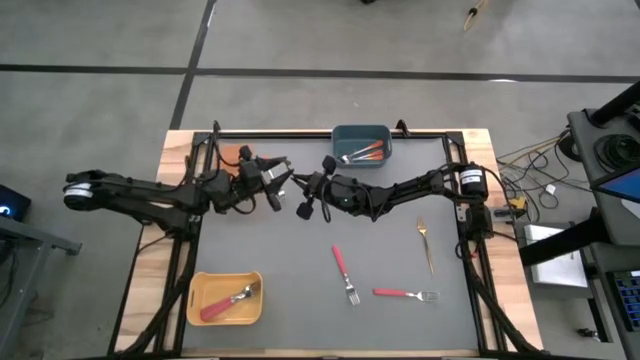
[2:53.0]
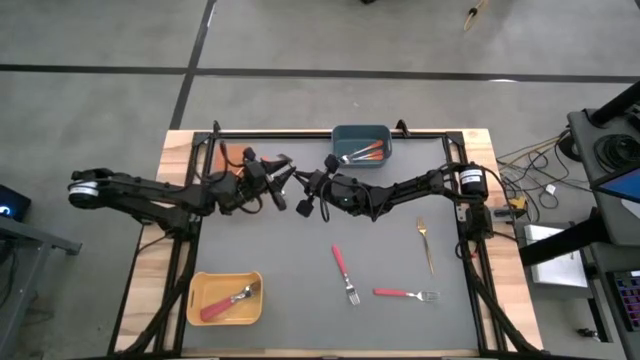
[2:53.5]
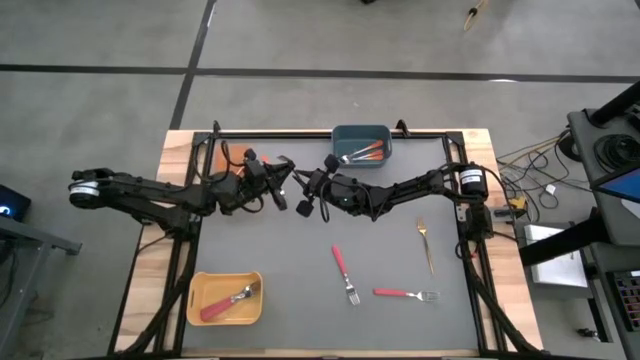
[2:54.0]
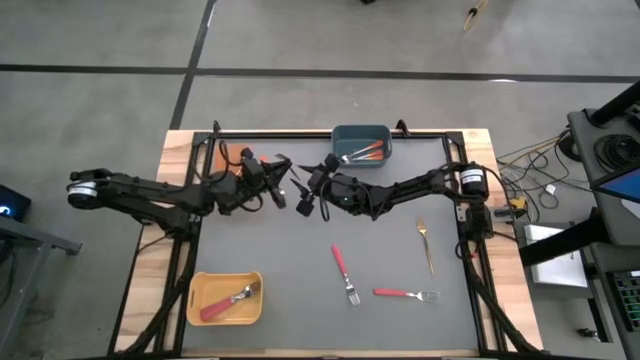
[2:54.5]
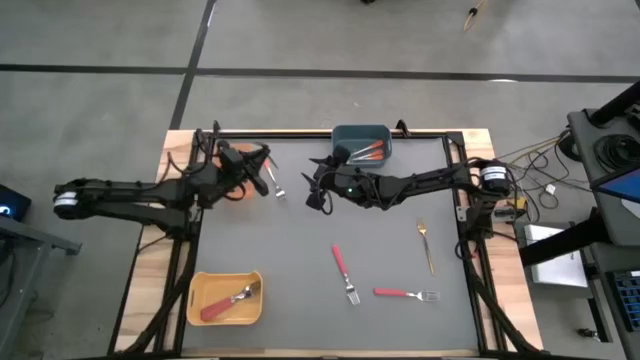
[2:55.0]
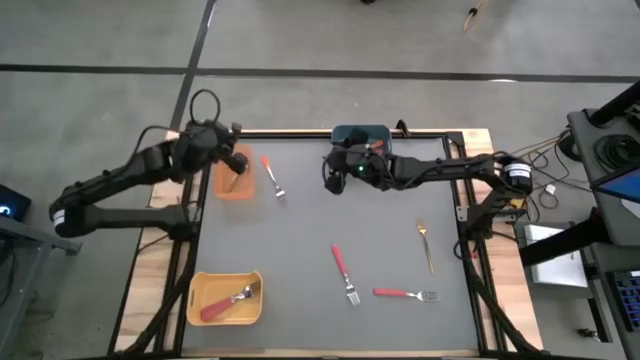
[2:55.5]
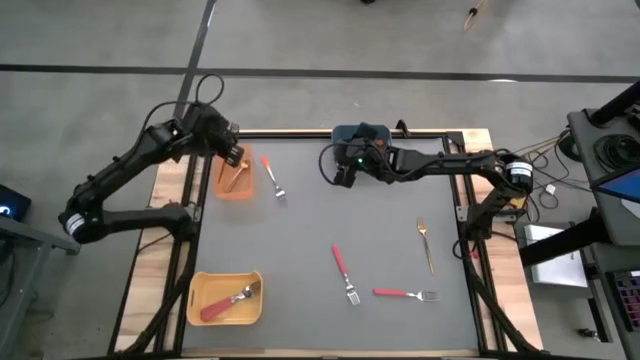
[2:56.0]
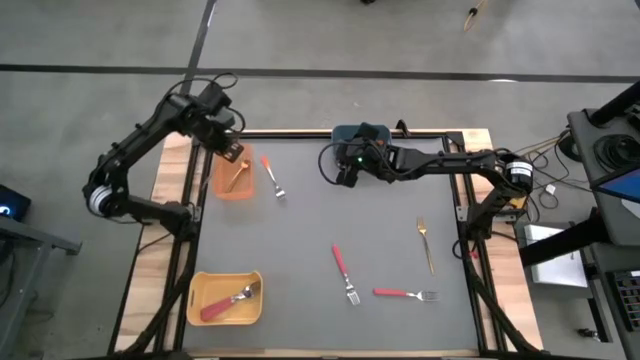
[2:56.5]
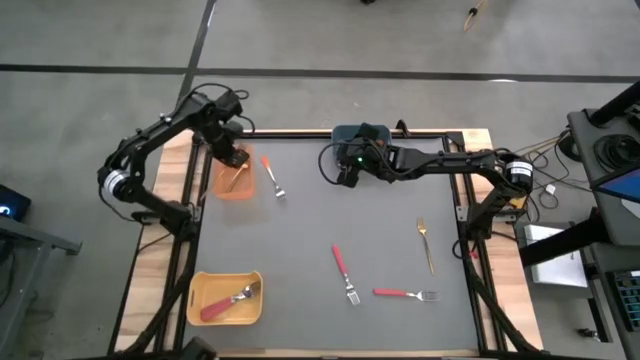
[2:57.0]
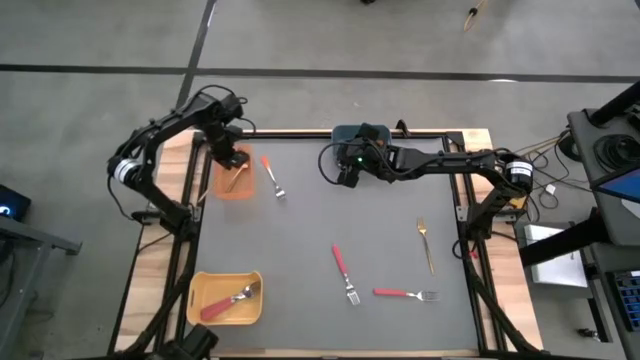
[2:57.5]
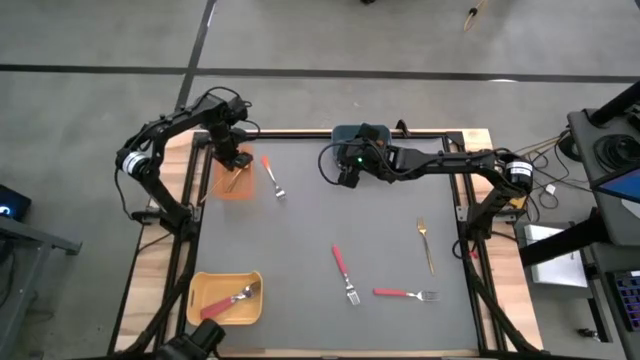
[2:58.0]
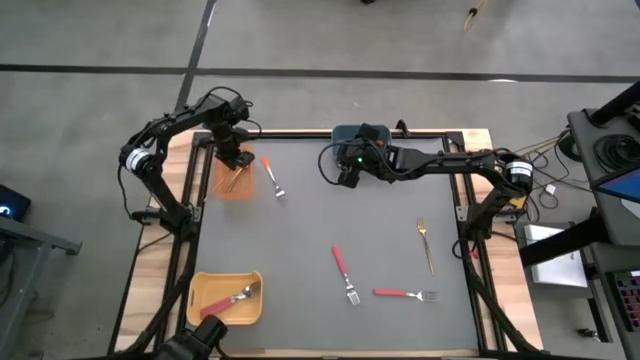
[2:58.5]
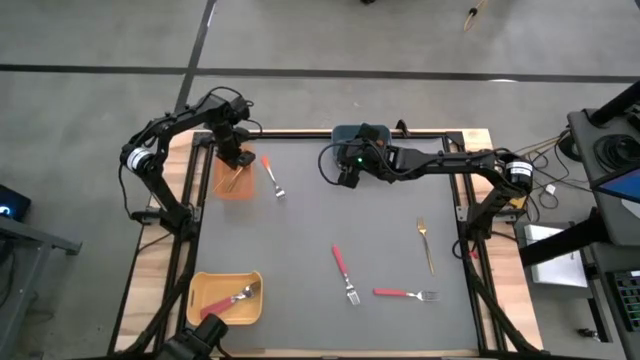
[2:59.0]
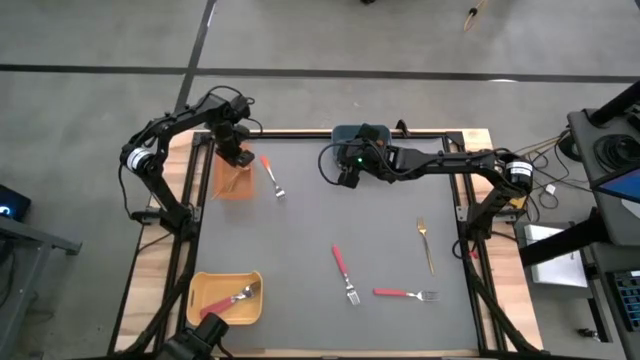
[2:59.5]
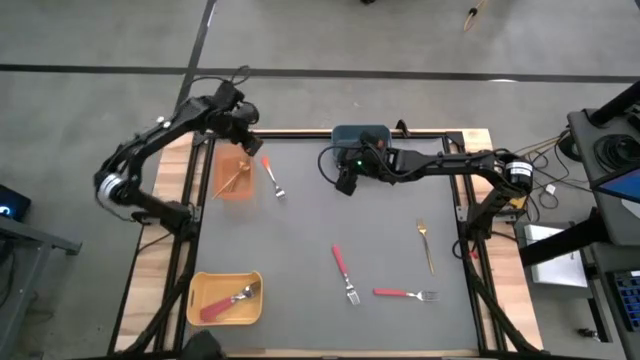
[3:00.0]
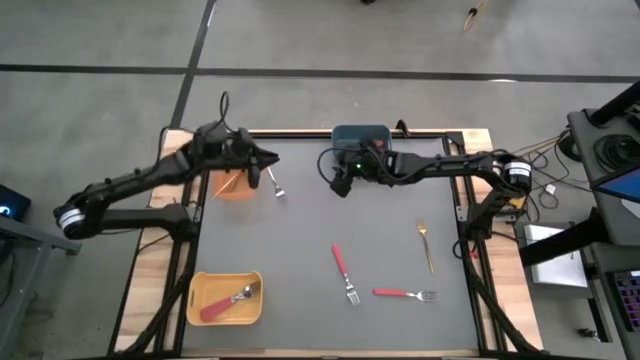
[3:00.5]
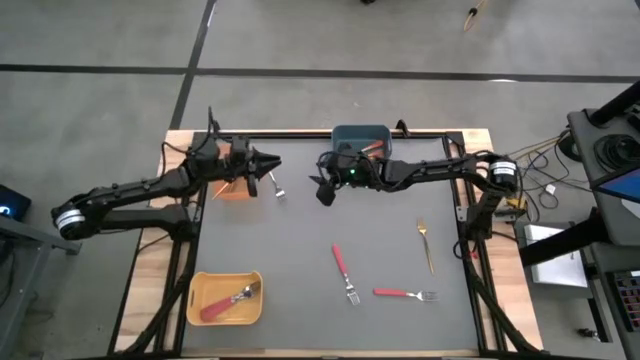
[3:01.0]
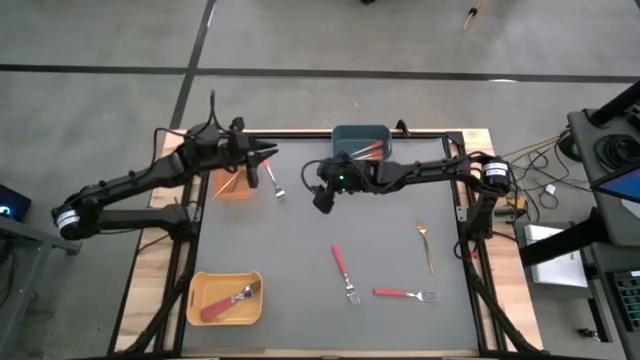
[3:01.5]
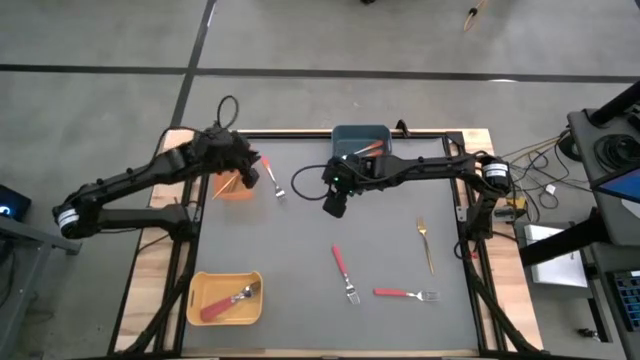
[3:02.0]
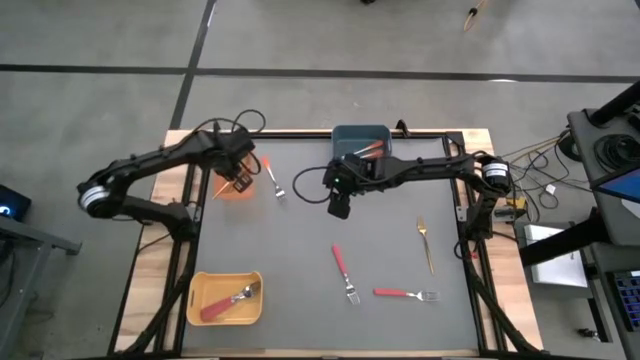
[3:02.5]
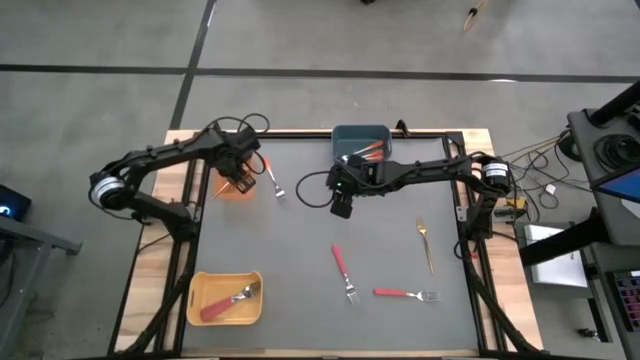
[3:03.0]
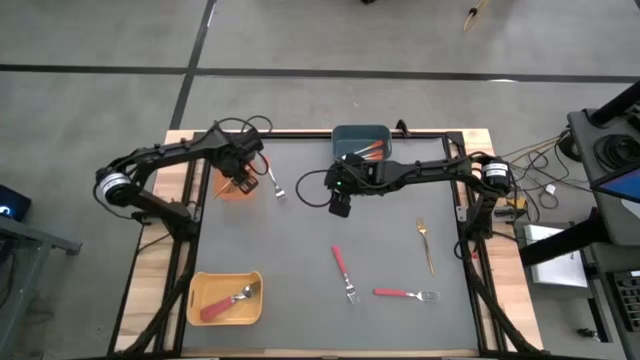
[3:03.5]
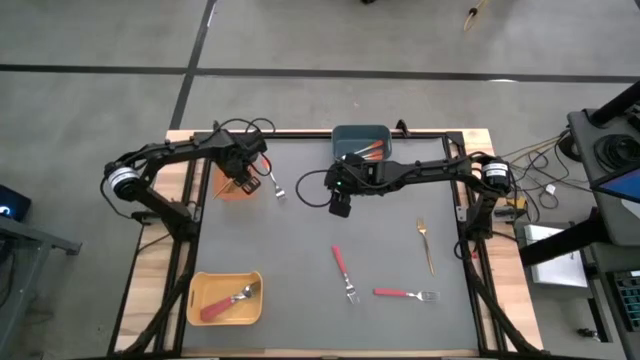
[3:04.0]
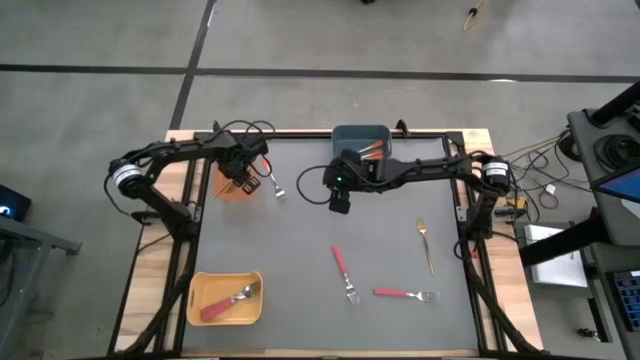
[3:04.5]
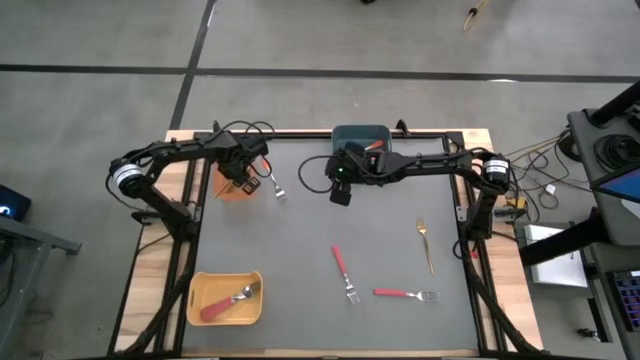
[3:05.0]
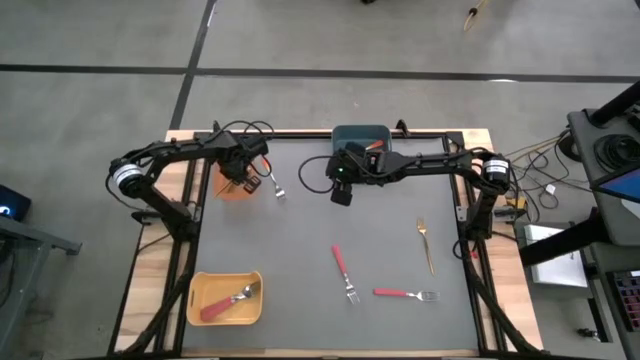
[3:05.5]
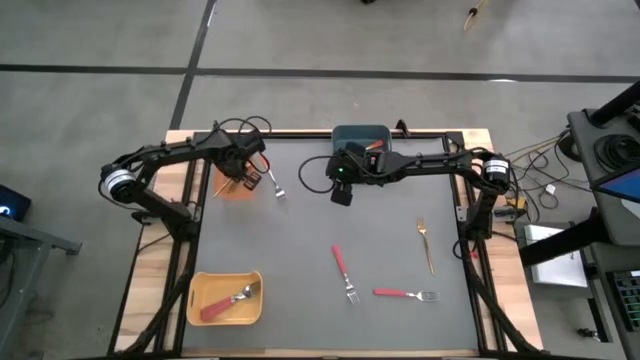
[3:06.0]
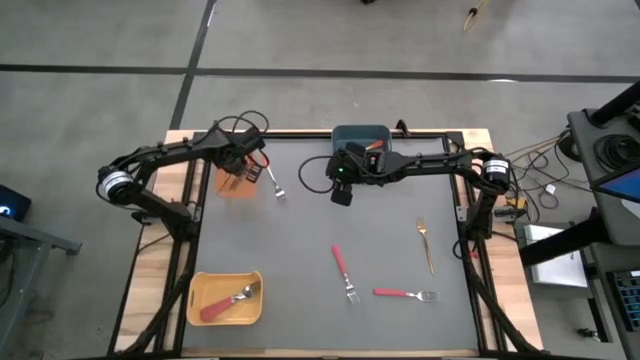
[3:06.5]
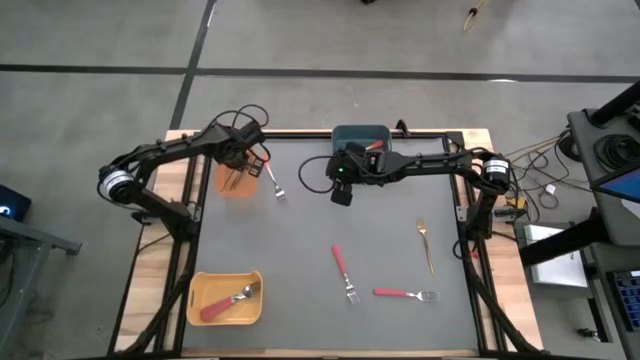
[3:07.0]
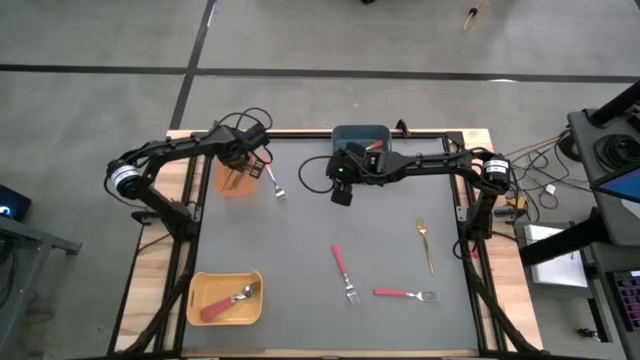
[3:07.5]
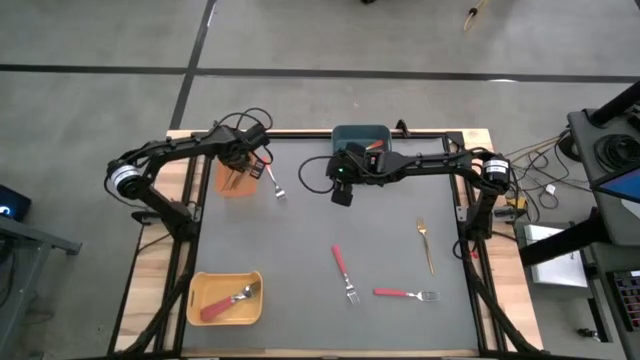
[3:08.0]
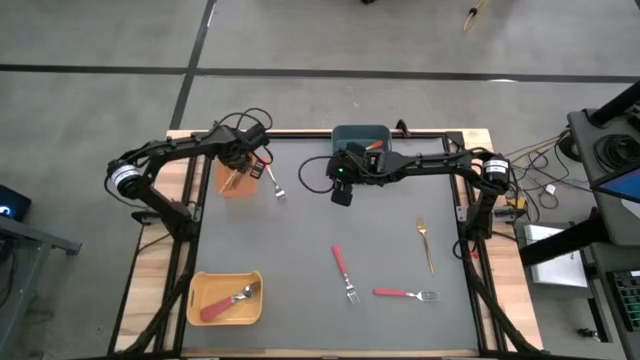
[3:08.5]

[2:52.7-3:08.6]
Task: Sort silverware by color (type)
Put the gold fork into the orange bin

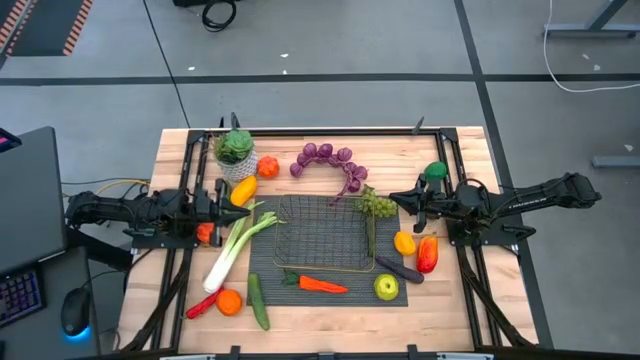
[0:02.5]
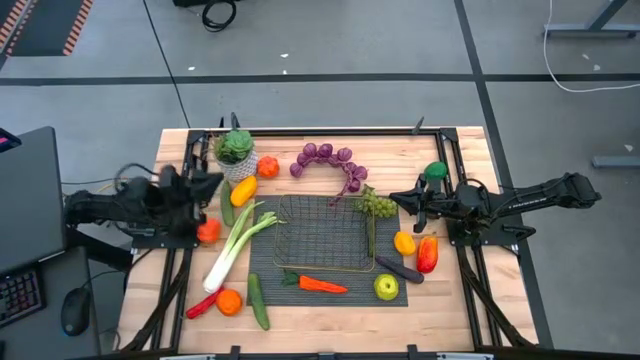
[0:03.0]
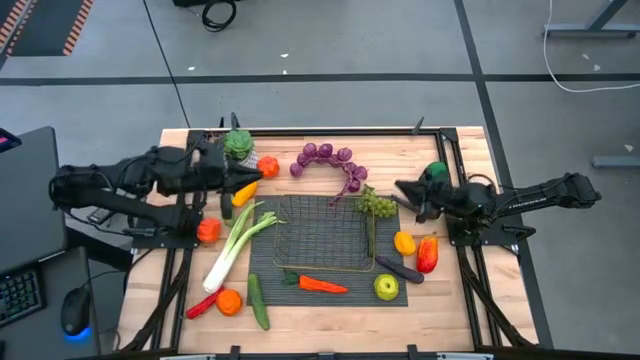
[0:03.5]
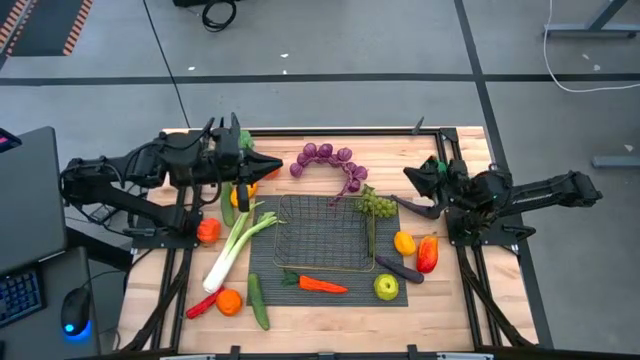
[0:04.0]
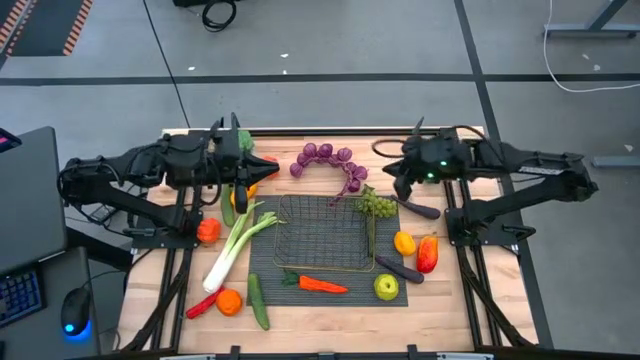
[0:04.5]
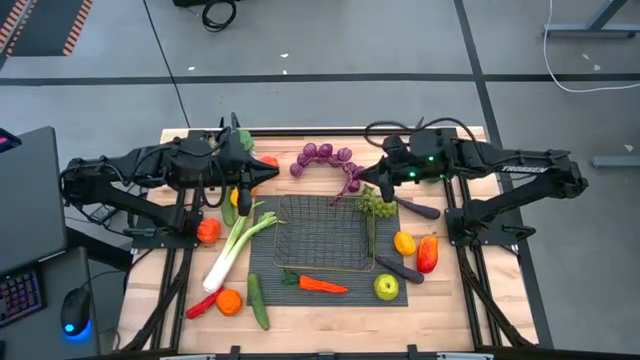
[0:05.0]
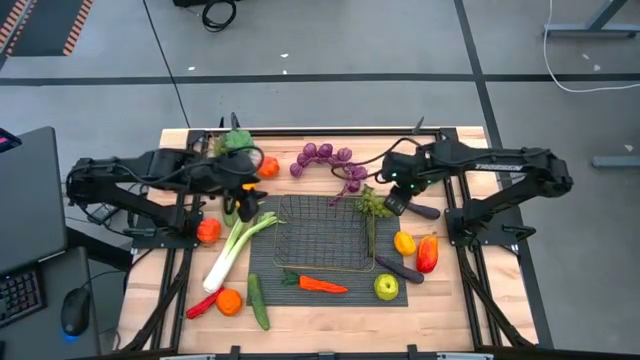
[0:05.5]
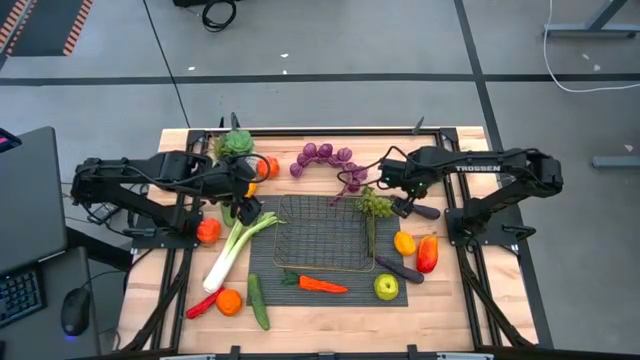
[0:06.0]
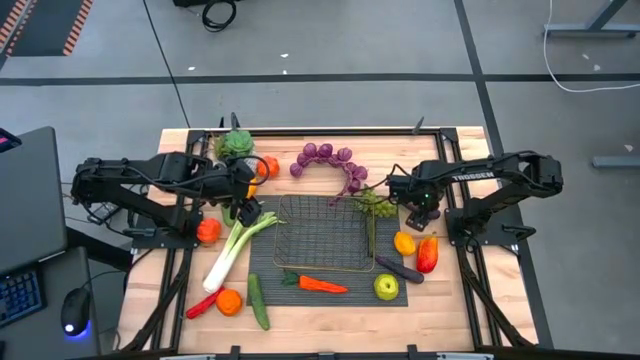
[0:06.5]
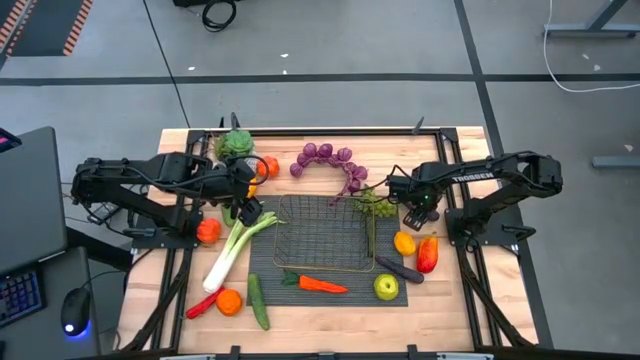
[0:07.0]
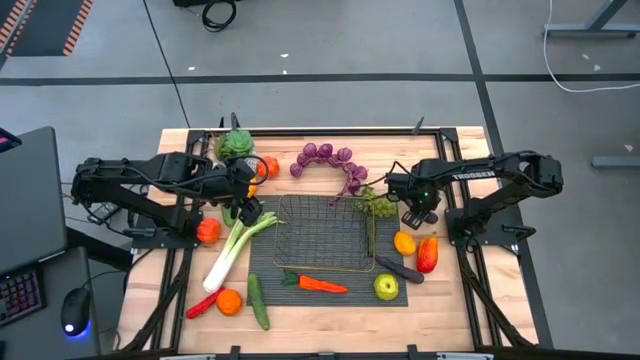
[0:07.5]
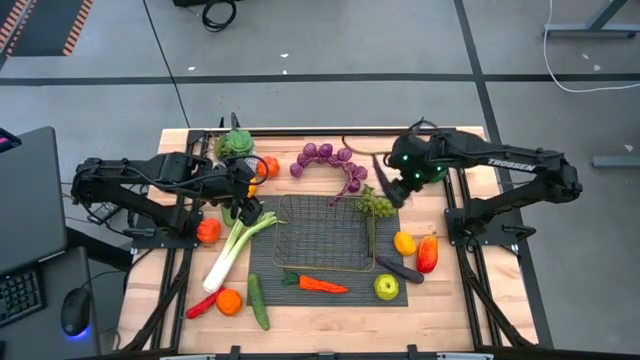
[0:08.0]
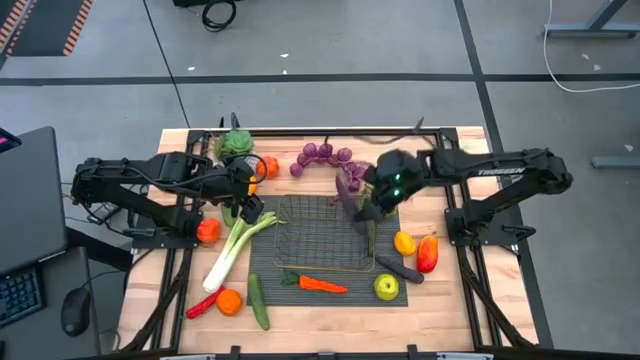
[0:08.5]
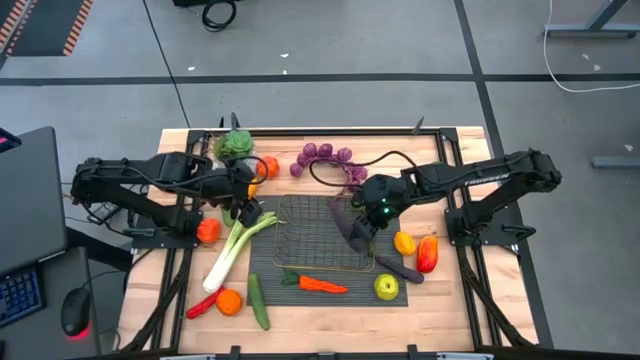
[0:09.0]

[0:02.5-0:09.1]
Task: Build produce basket
Put the top purple eggplant into the gold wire basket
